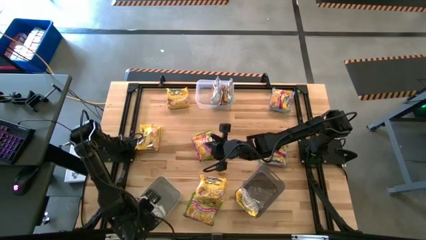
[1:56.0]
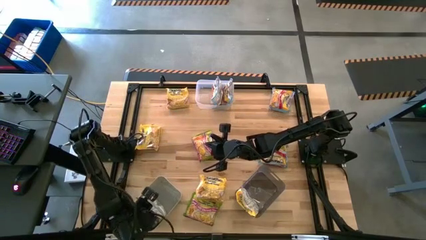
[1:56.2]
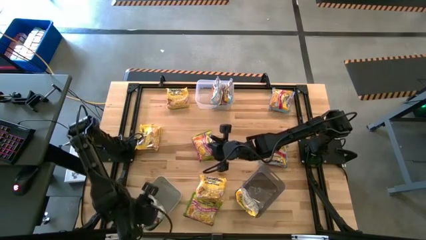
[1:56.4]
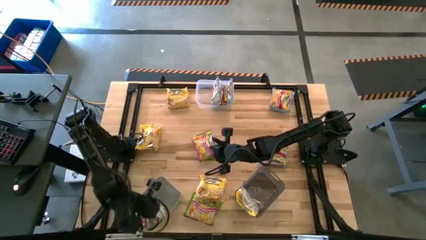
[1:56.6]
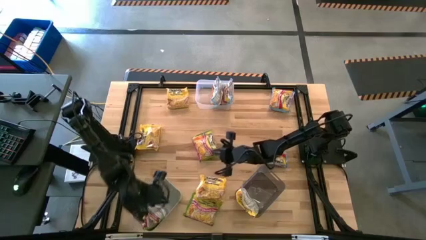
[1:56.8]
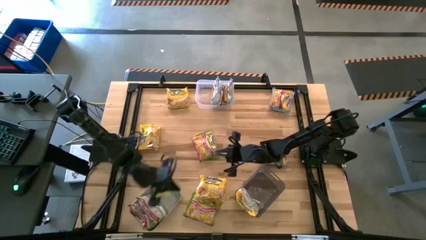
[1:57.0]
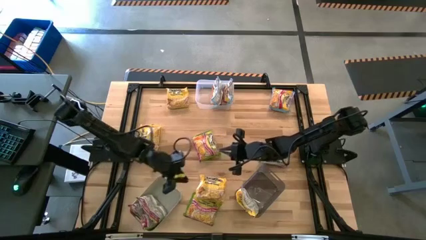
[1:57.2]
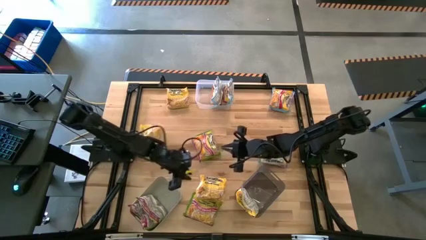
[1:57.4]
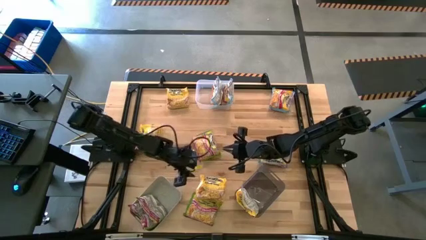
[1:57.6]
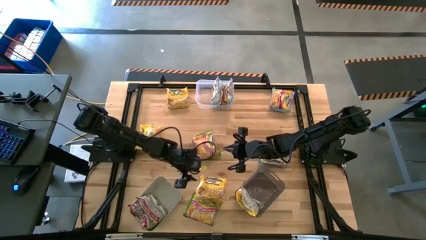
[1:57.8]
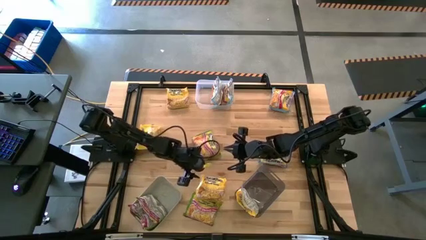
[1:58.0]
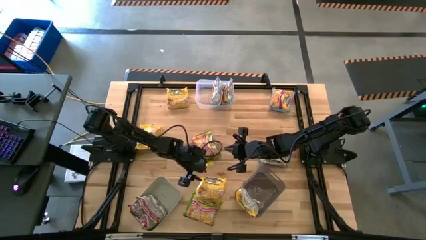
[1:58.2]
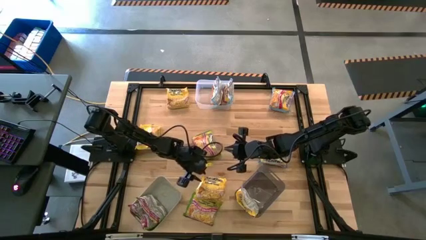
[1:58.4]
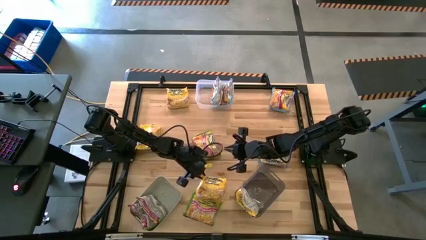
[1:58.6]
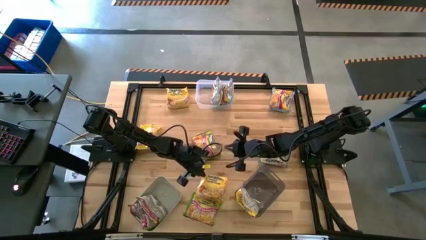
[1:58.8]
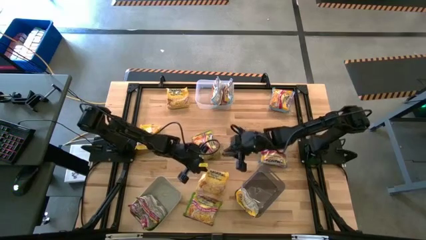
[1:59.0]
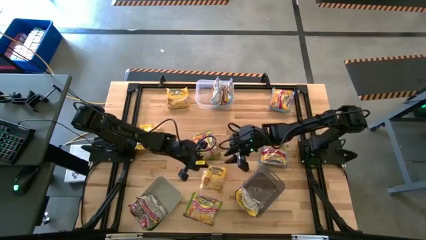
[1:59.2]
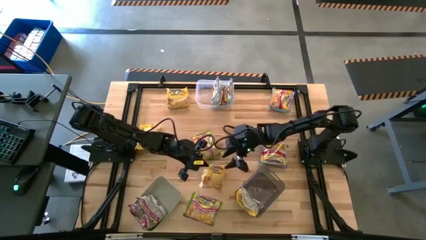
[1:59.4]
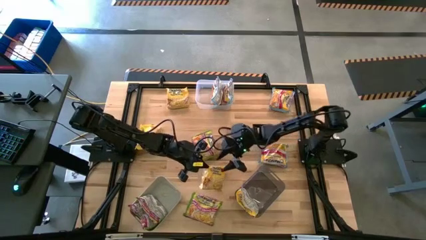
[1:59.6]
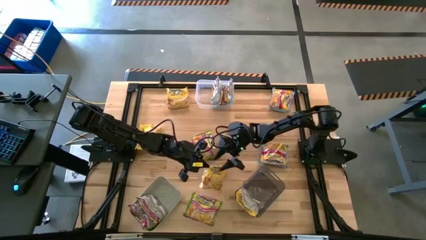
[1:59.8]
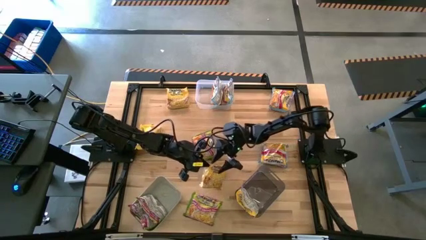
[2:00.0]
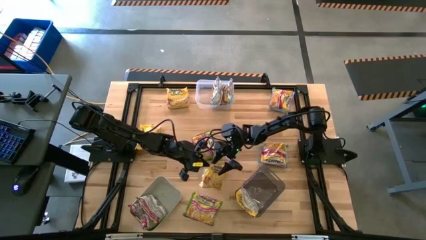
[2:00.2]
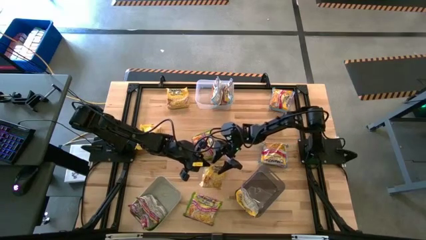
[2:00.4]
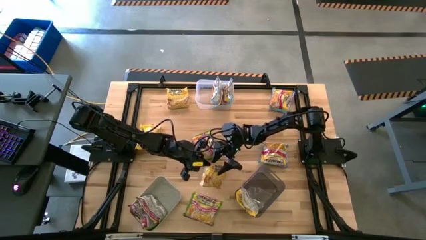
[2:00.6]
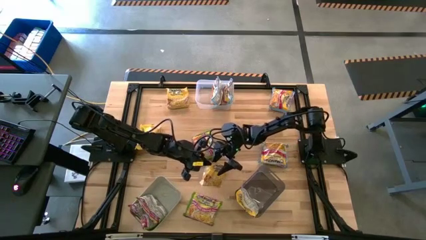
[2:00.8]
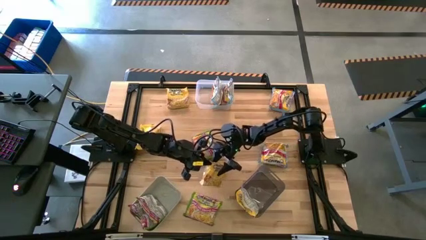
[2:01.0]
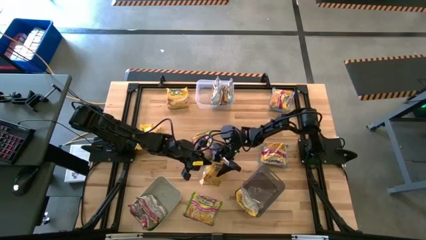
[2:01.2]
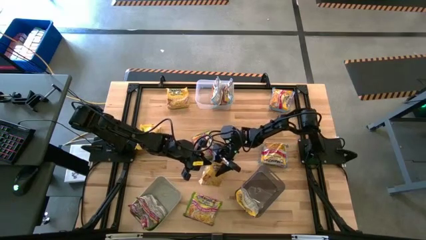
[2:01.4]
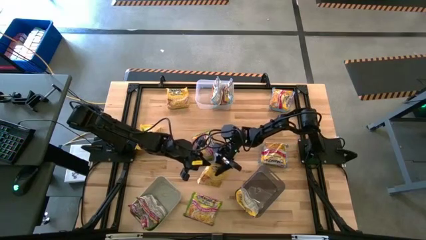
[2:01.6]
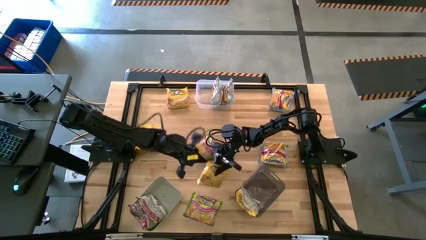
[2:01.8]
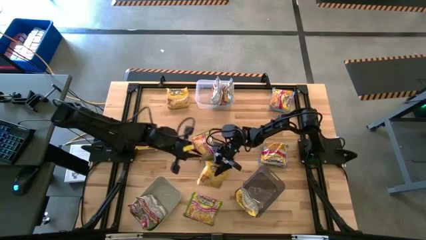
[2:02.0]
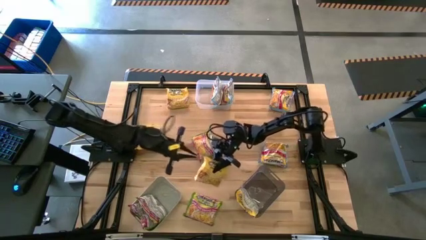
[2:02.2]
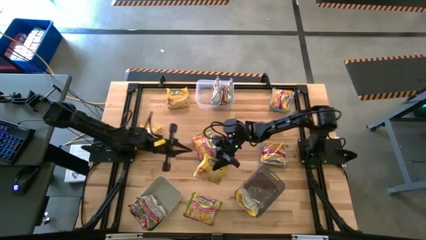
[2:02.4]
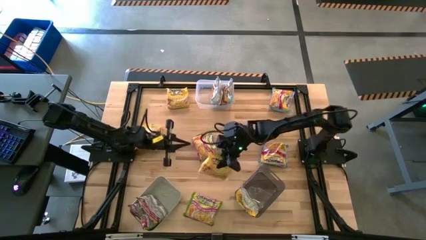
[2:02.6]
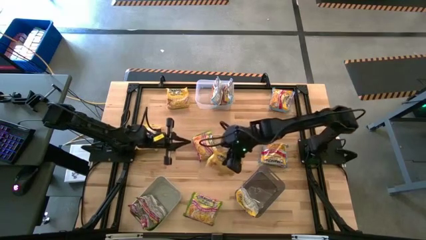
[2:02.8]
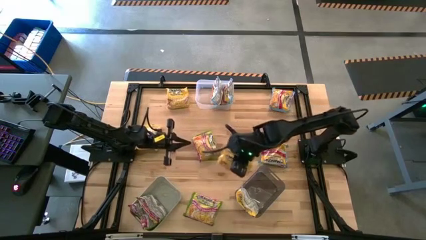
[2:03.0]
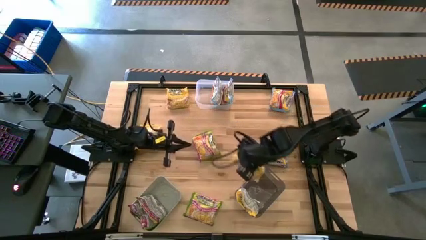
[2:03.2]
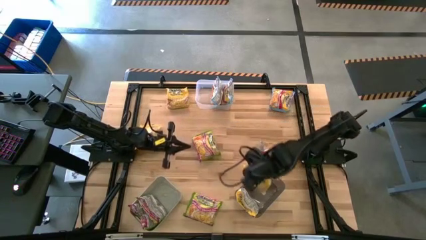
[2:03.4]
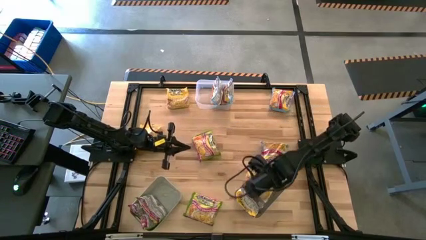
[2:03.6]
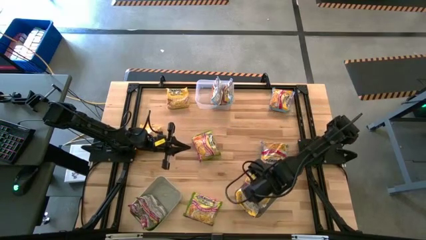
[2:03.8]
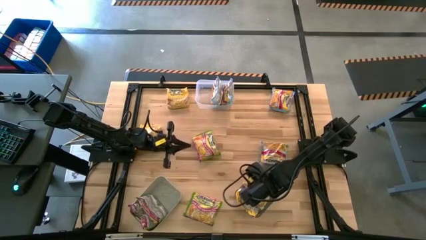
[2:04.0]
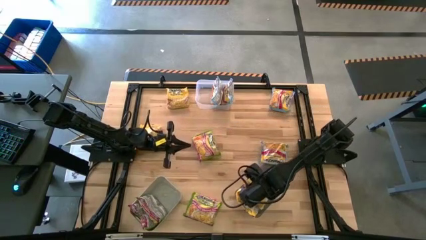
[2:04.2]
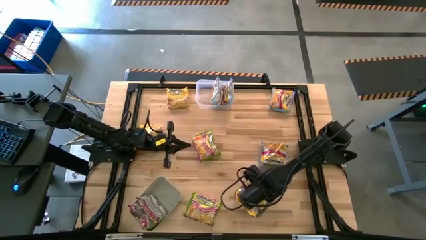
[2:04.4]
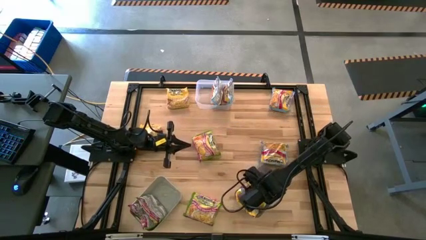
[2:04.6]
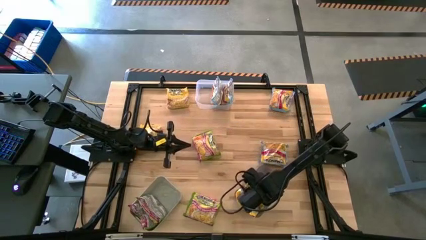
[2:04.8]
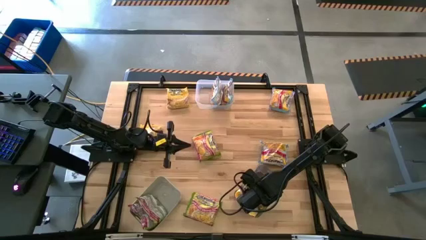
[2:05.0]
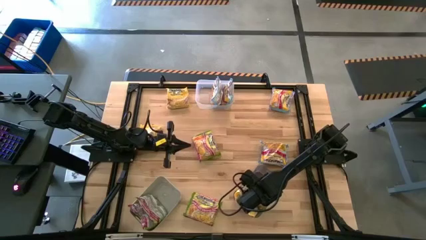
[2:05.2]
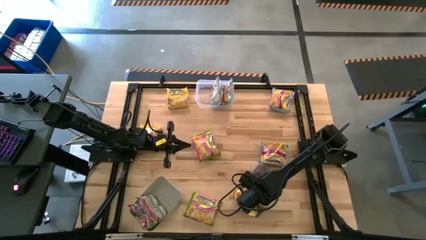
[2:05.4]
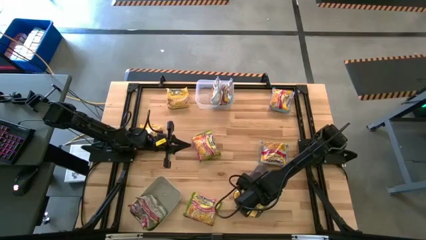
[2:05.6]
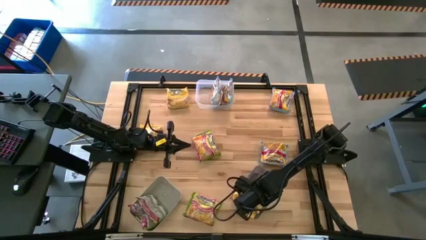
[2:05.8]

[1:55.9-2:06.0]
Task: Sort Maruchan noodles
Put the yellow noodle pack into the black bin

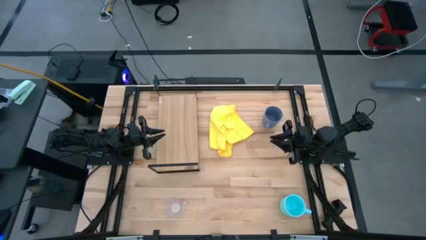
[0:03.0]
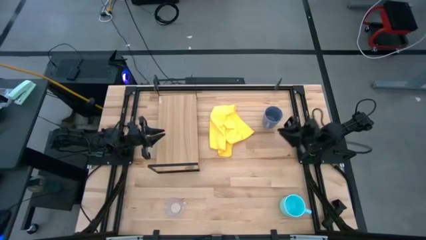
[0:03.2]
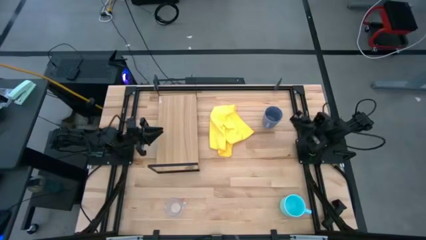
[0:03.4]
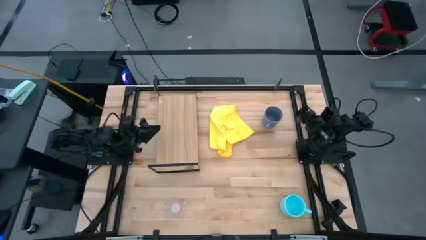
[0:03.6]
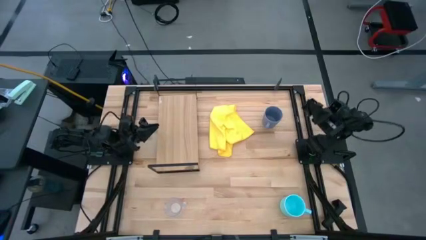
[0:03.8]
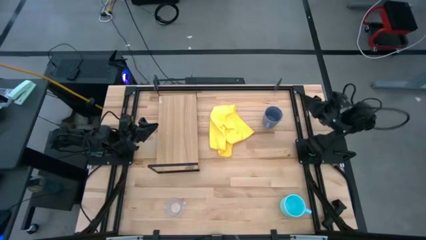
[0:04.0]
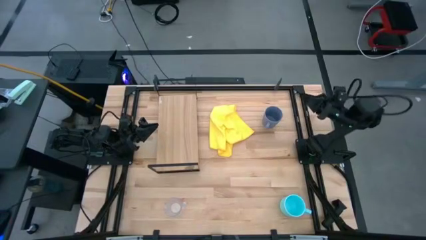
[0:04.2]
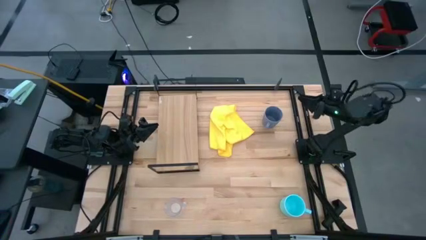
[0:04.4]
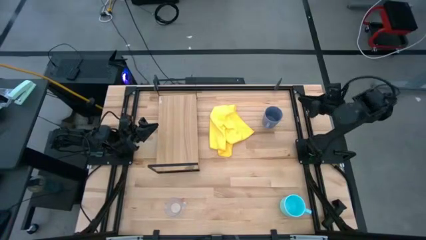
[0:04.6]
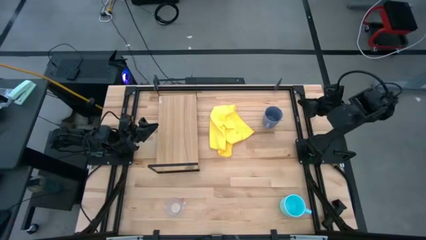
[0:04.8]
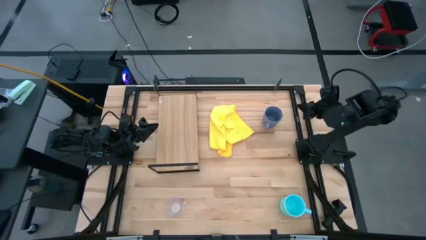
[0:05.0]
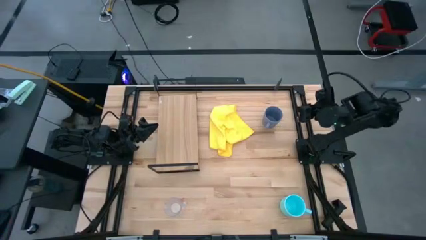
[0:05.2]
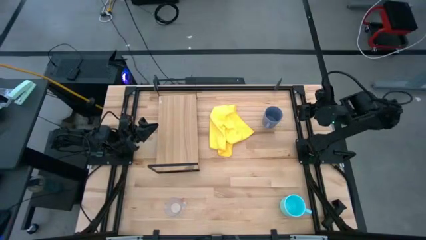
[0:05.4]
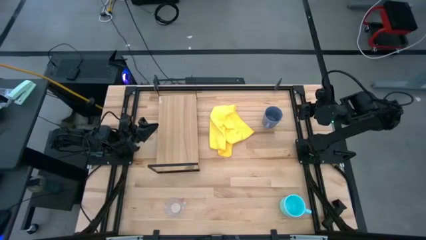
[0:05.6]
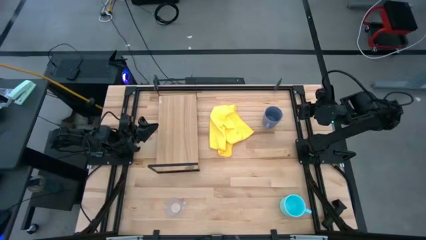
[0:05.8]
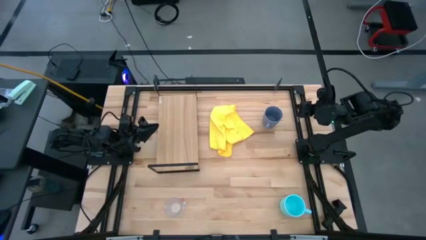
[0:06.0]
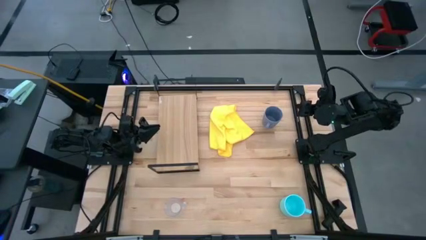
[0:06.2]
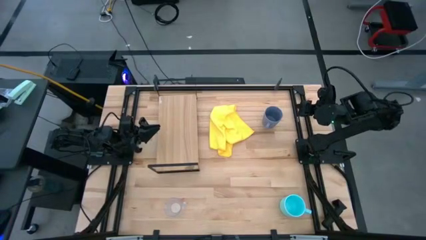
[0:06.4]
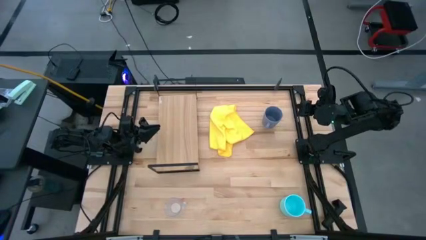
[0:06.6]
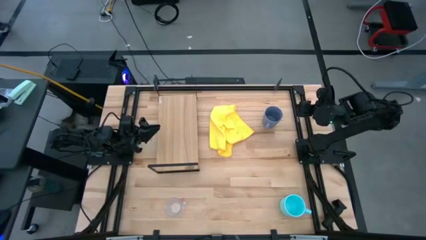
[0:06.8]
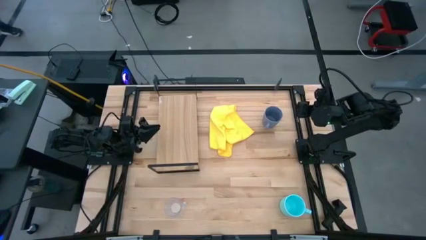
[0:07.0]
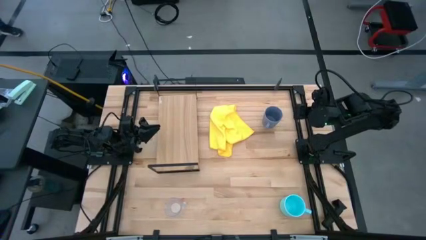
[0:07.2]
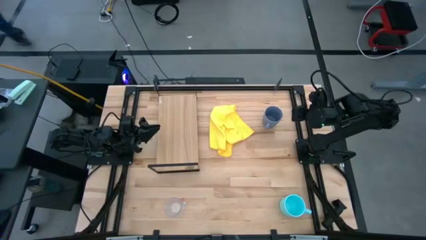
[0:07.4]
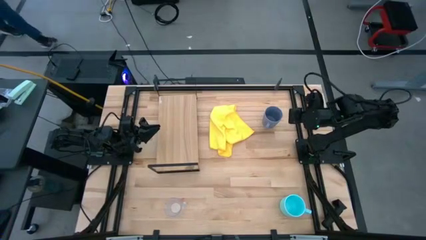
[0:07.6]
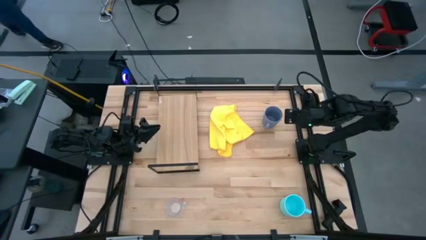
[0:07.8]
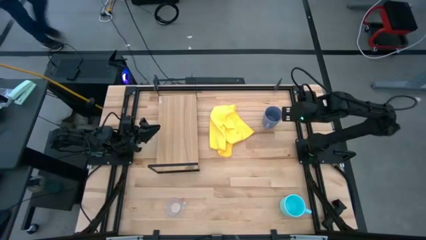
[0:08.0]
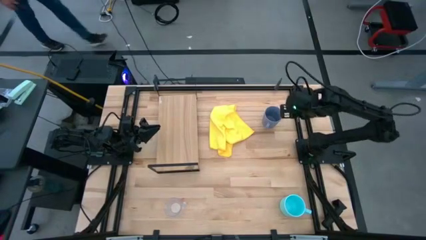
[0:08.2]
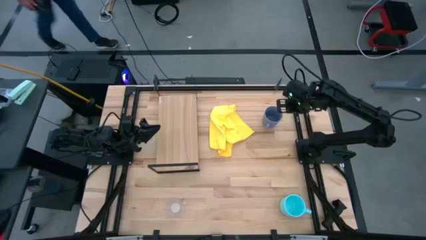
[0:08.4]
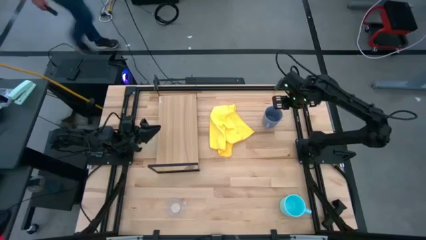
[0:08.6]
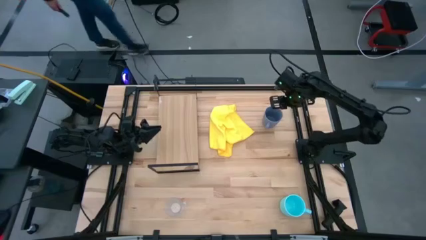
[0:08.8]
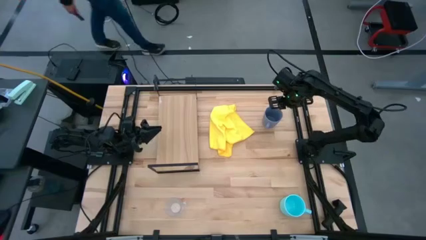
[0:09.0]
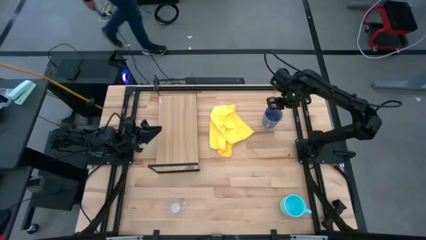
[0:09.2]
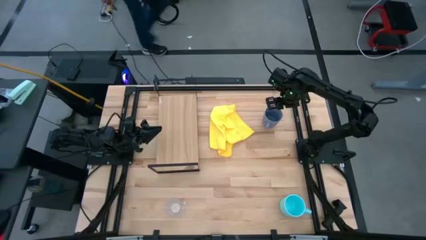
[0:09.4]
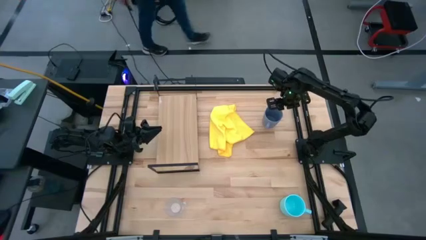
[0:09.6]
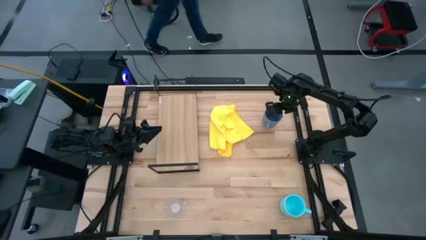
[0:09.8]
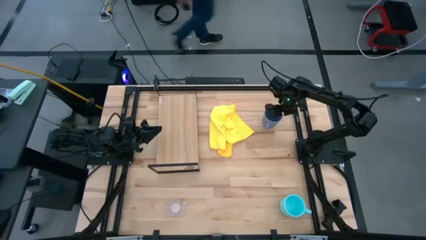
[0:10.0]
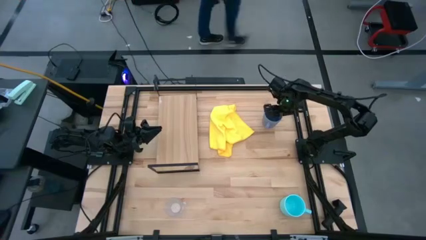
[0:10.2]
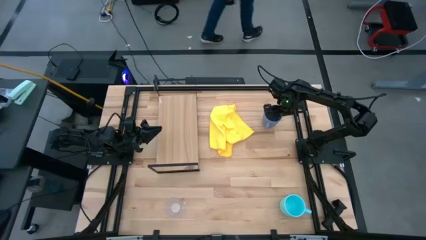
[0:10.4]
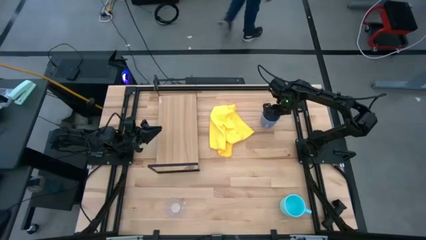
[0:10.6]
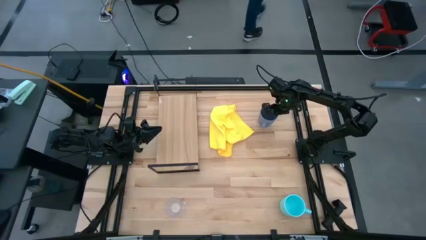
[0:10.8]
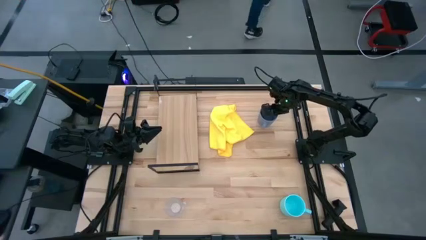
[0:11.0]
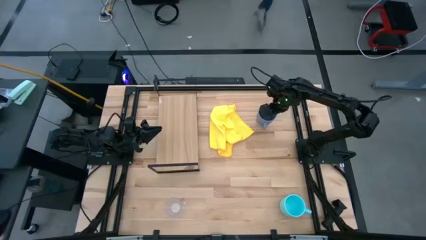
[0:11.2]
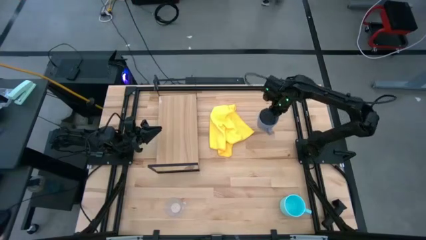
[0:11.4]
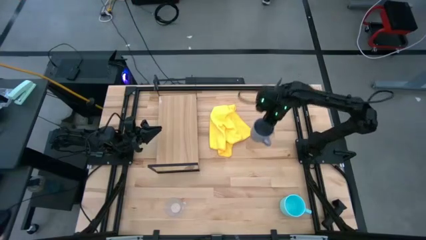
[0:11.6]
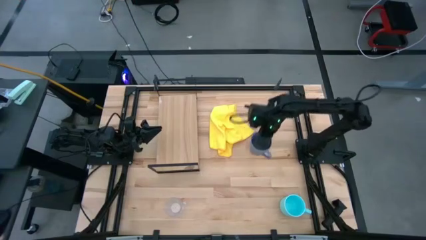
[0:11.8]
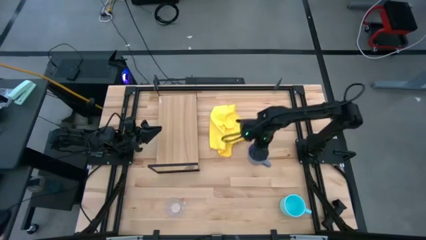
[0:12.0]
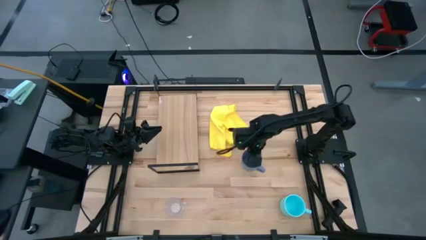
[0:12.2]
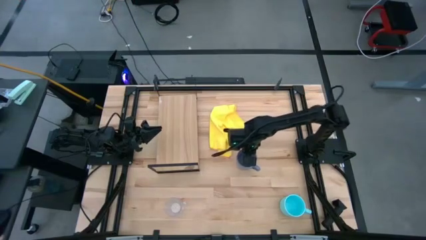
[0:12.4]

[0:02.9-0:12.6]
Task: Stack small to large cups/mugs on shelf
Put the violet mug on the shelf
